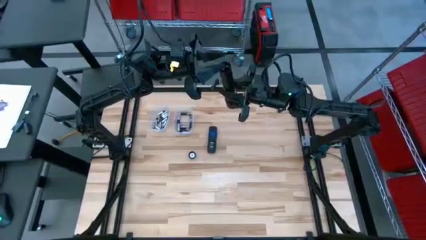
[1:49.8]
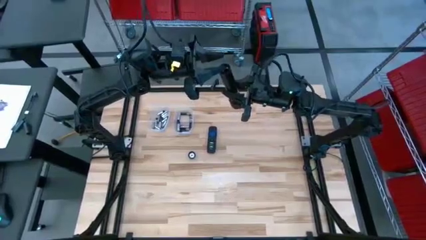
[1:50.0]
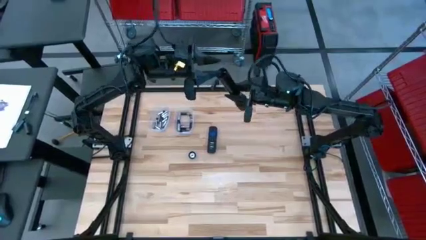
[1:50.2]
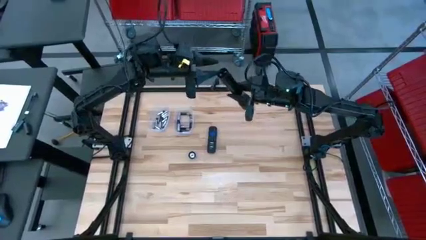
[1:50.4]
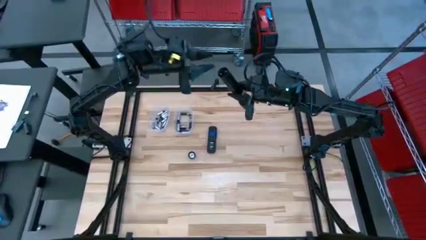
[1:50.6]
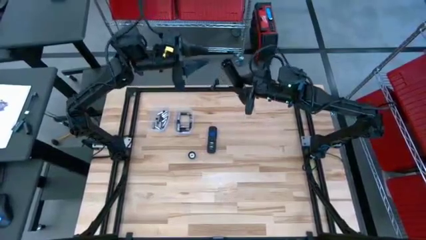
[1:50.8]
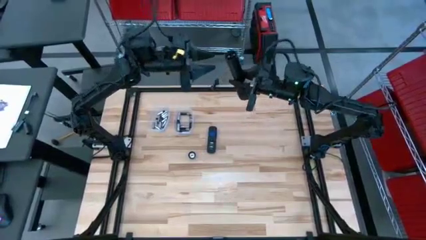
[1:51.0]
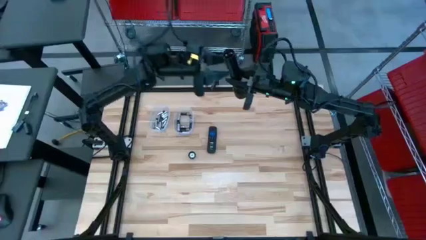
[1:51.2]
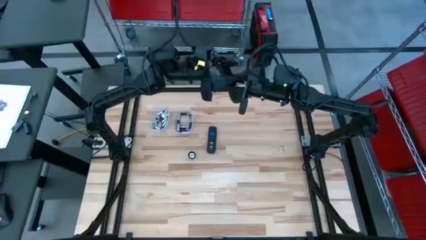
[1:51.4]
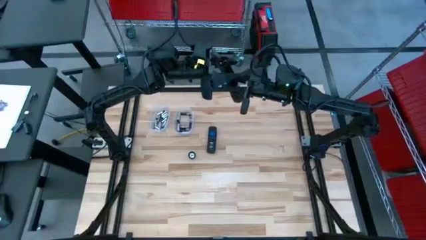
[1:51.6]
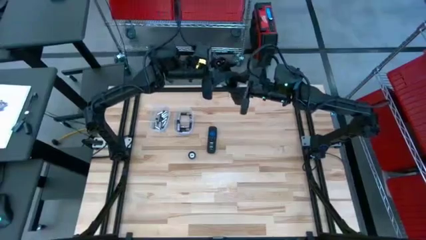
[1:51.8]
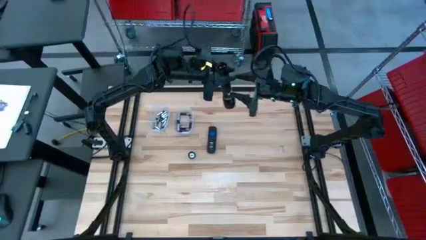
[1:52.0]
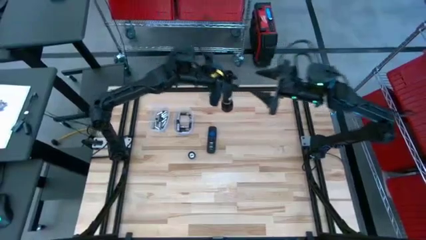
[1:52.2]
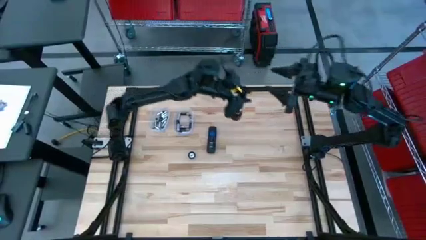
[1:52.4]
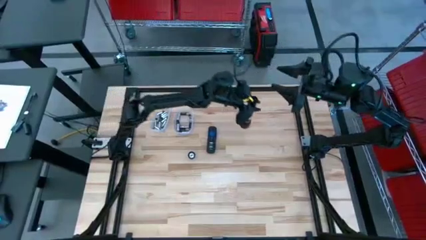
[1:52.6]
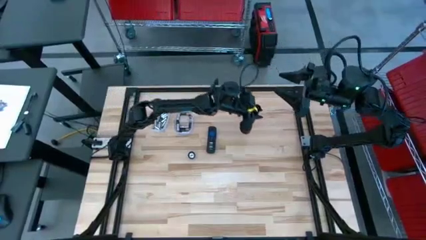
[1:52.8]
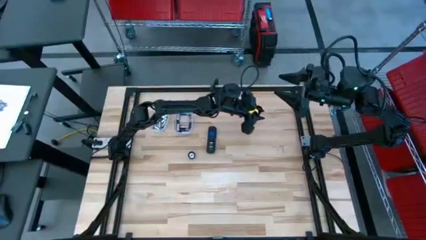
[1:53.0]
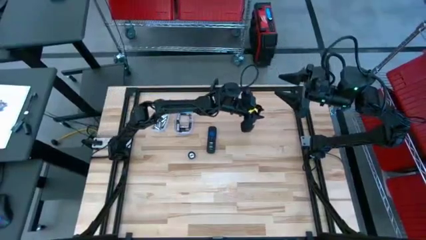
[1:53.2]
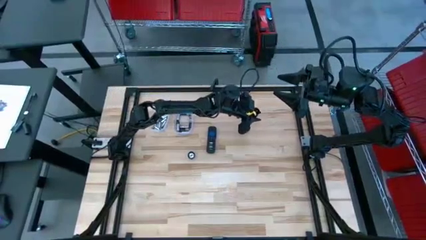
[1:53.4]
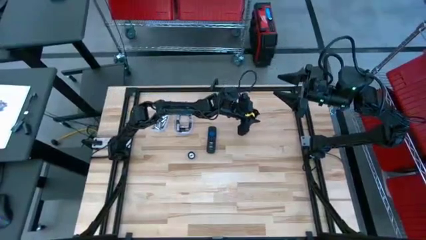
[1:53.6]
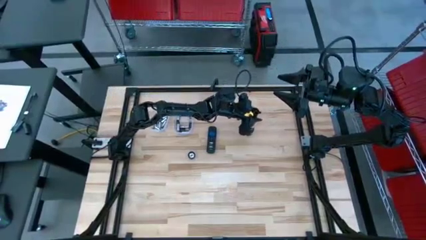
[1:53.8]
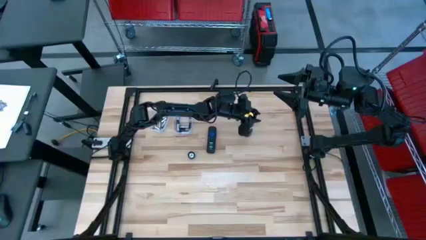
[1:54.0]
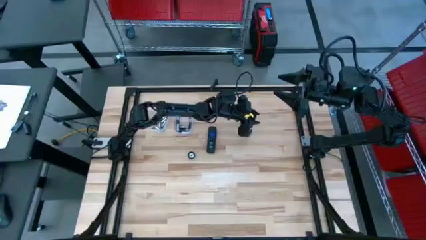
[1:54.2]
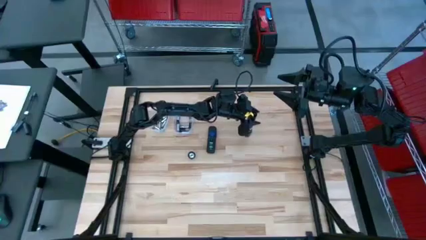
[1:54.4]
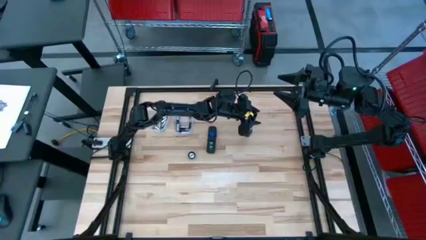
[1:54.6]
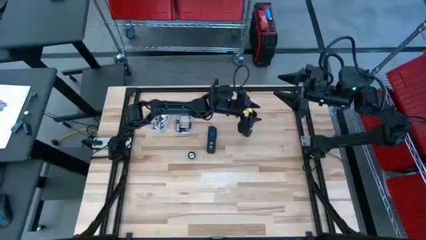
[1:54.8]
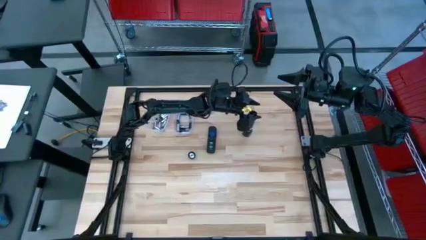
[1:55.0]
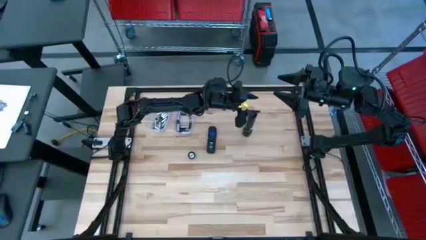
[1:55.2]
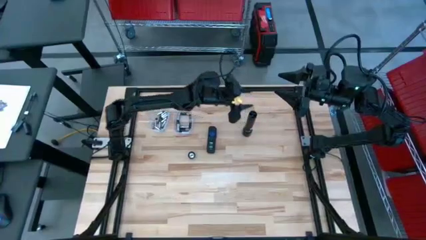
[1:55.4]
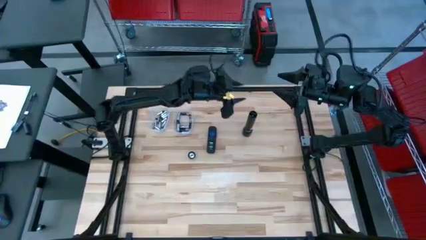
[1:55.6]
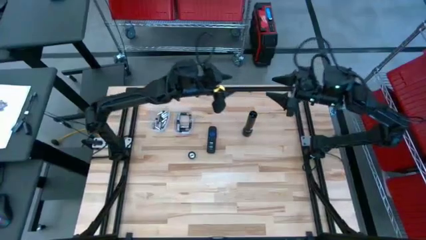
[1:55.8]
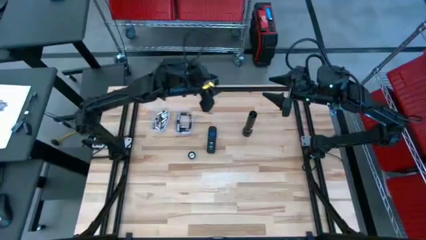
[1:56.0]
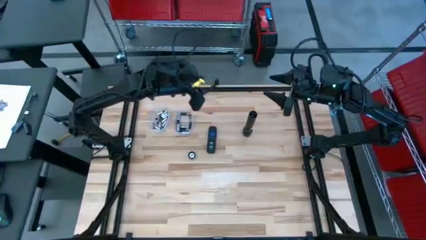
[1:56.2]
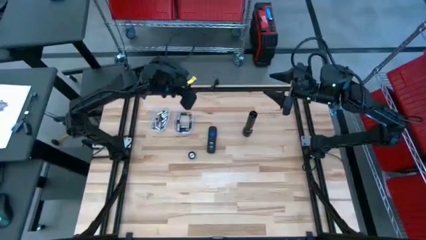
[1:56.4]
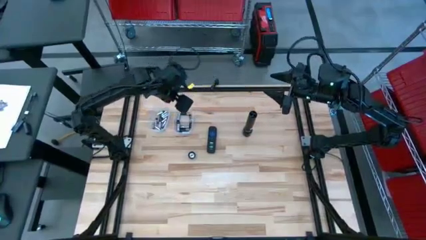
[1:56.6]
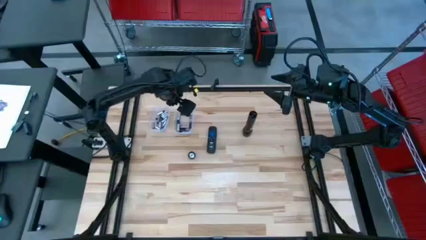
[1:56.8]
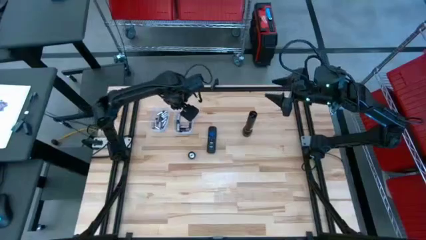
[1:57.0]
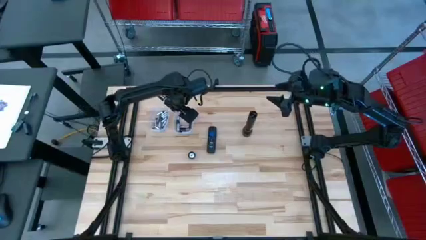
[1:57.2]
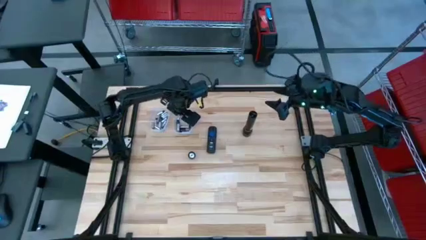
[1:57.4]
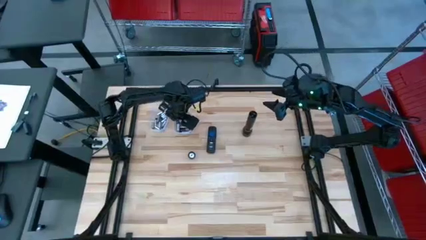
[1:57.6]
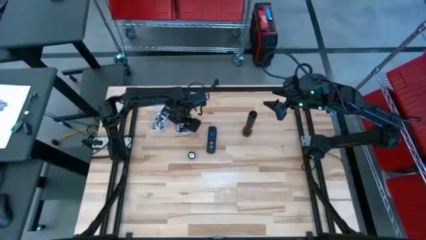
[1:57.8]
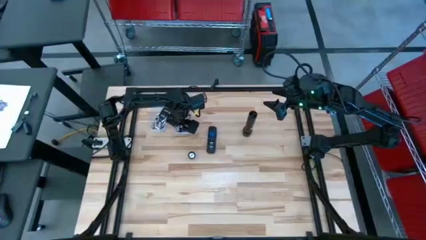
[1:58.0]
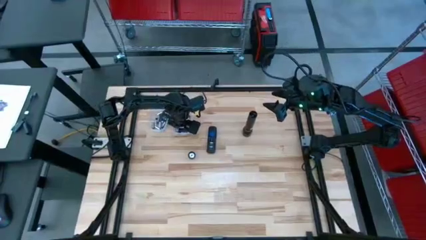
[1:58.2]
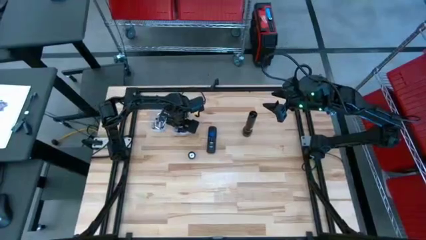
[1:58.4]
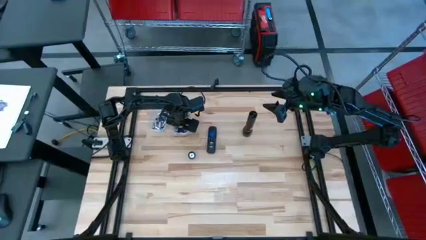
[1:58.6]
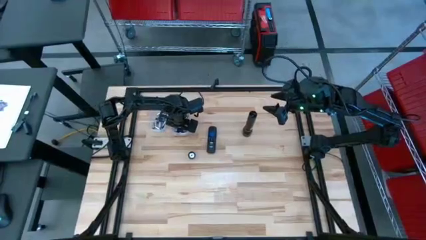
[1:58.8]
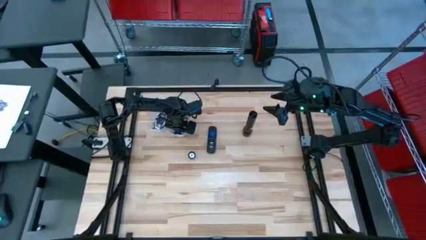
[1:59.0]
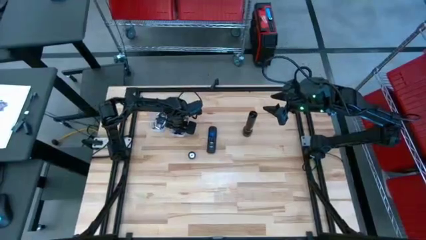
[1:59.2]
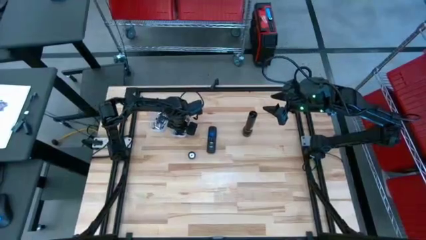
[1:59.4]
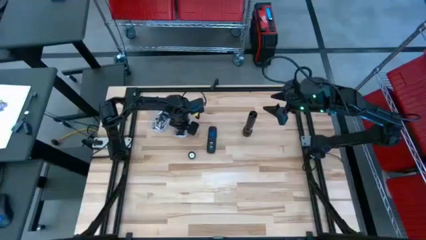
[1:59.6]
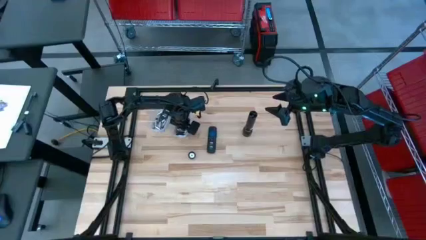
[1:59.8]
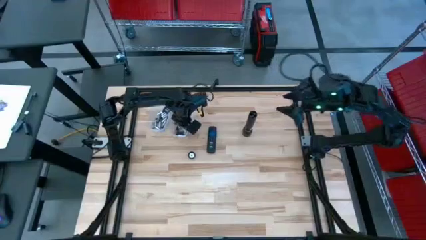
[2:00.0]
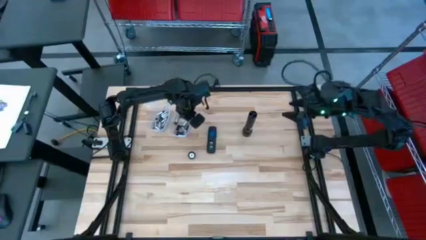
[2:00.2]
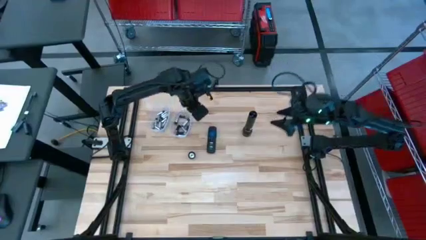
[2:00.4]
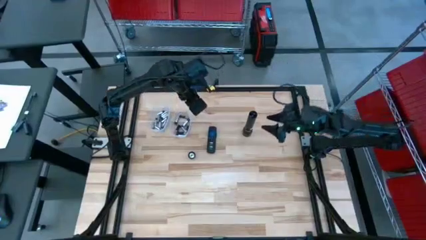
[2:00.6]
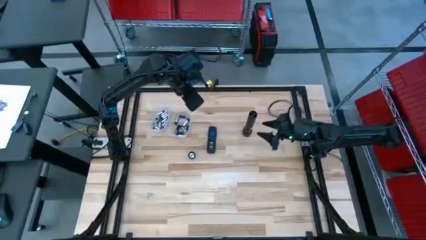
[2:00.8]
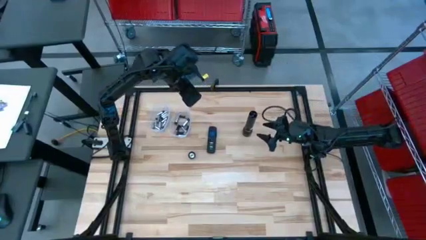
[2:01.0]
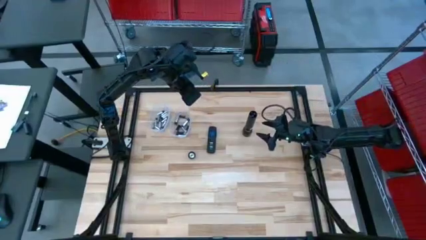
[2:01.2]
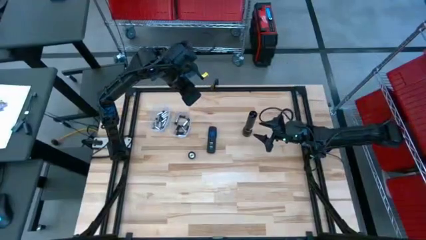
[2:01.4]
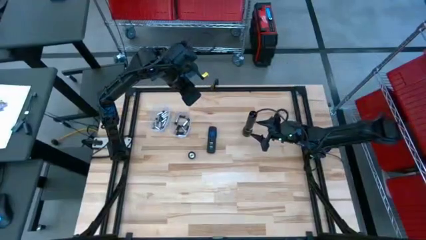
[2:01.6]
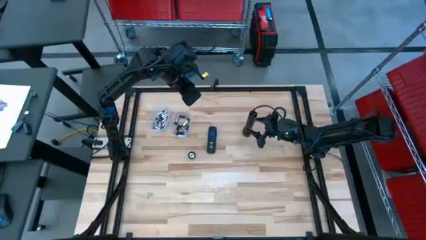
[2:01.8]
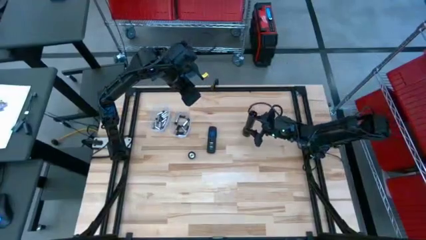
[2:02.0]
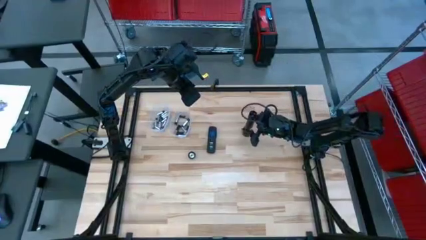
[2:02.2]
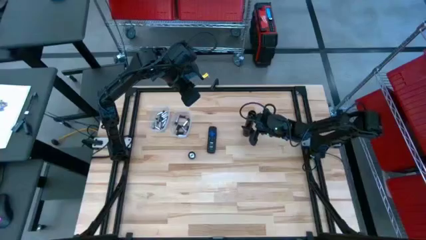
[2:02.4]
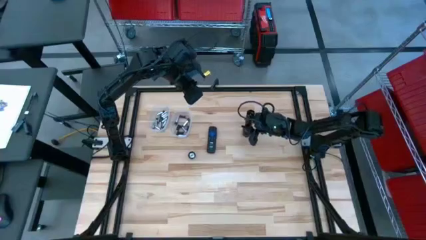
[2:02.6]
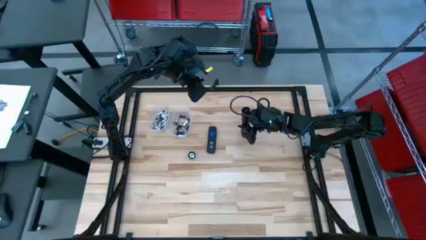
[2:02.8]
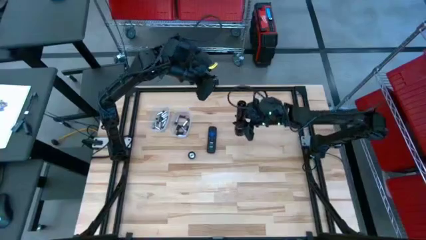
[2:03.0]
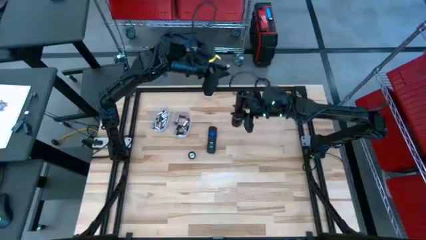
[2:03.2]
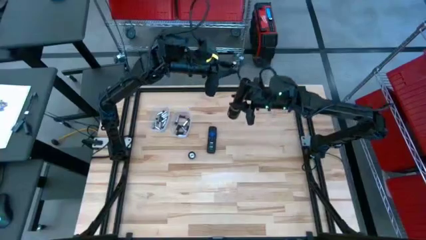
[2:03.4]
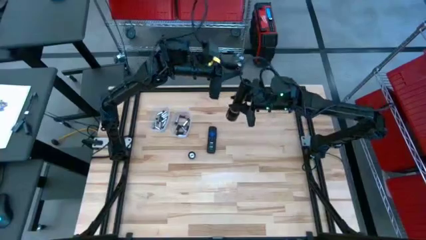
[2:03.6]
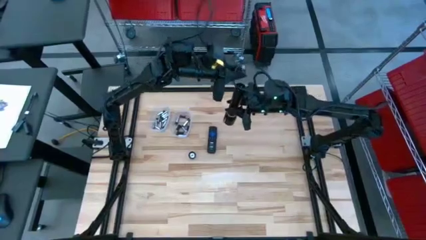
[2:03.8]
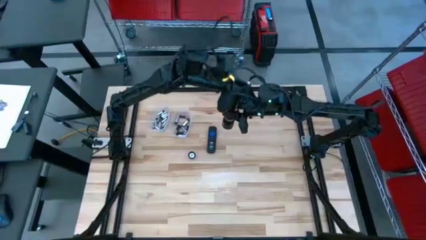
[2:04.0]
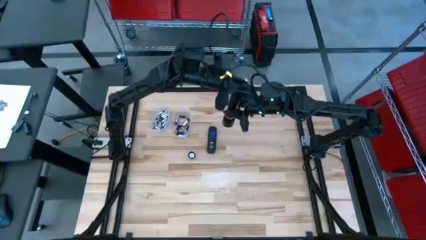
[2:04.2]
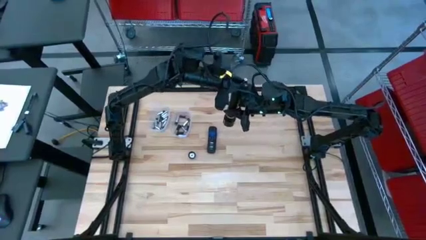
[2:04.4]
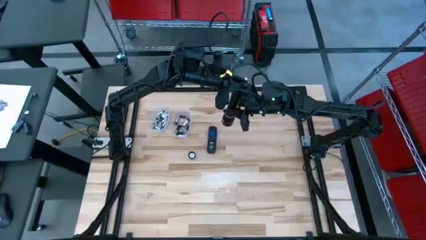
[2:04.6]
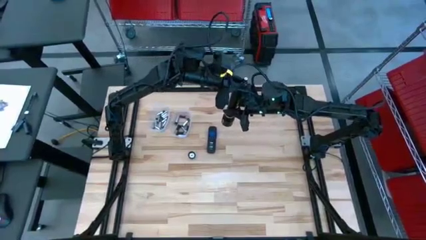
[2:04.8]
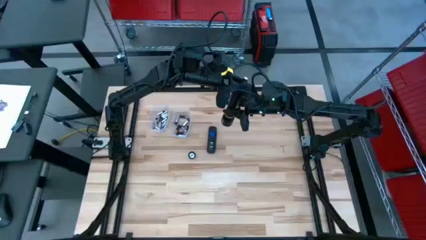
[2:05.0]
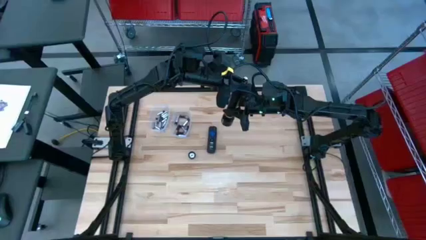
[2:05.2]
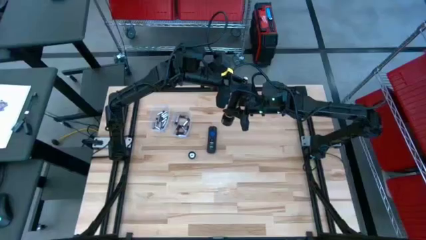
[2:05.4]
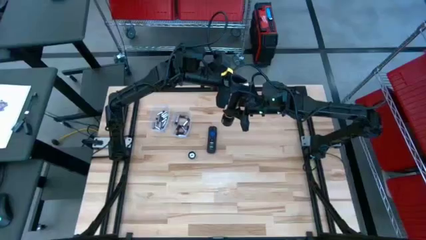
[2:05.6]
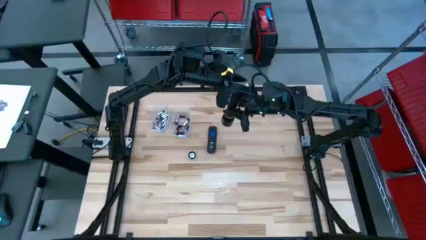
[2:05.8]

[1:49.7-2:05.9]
Task: Insert battery
Insert the silver battery into the flashlight battery compartment
